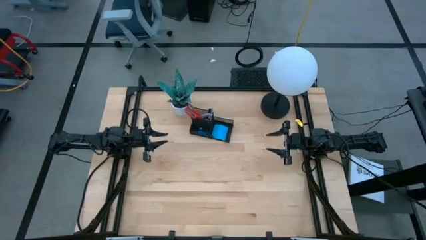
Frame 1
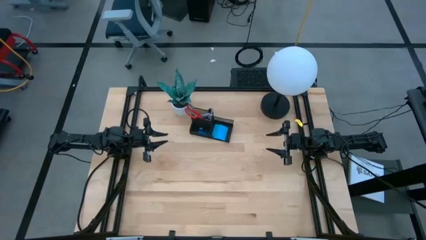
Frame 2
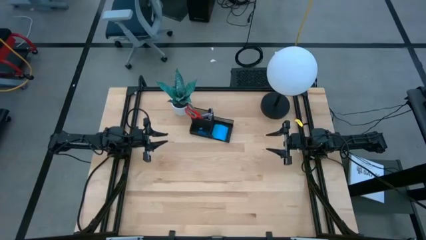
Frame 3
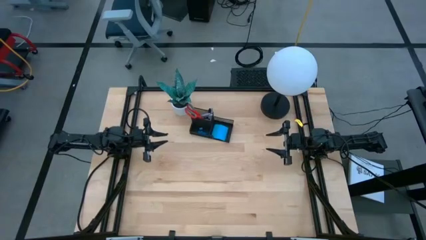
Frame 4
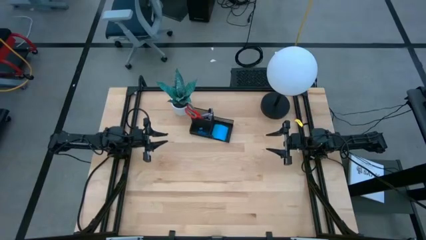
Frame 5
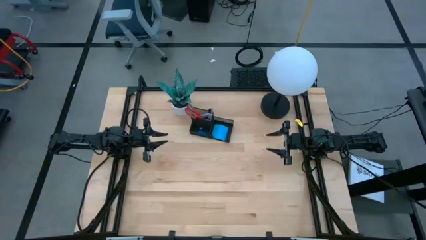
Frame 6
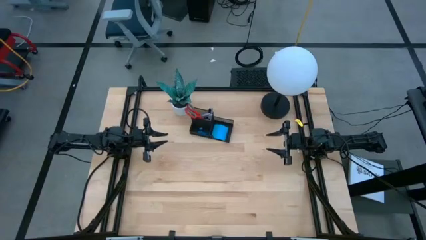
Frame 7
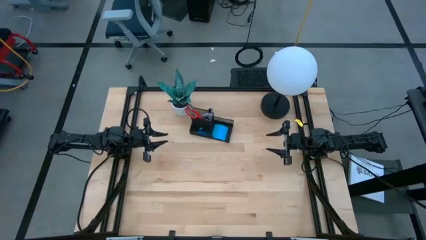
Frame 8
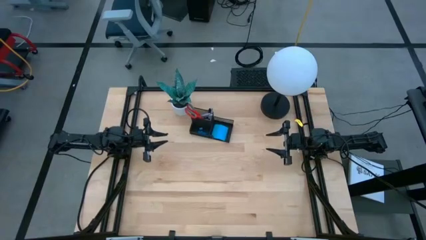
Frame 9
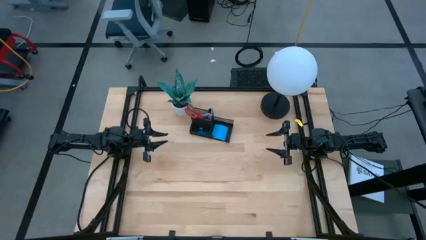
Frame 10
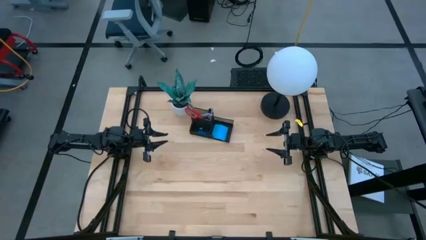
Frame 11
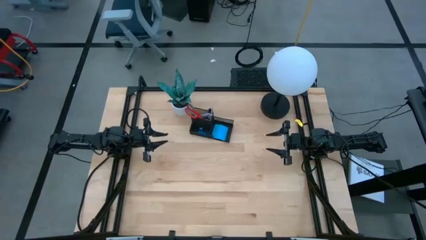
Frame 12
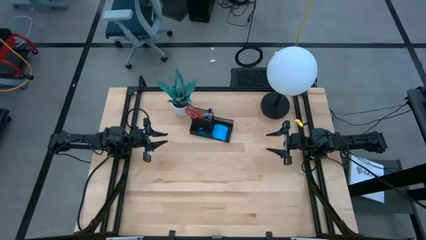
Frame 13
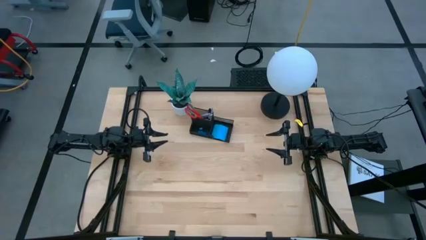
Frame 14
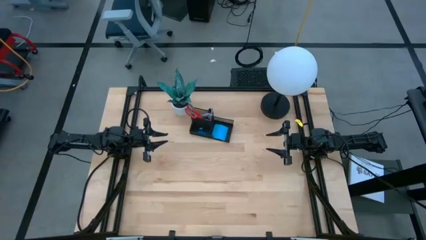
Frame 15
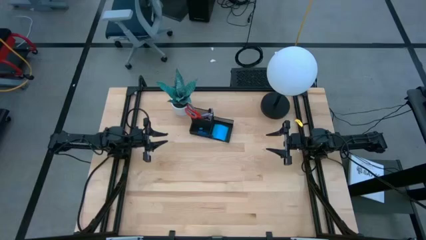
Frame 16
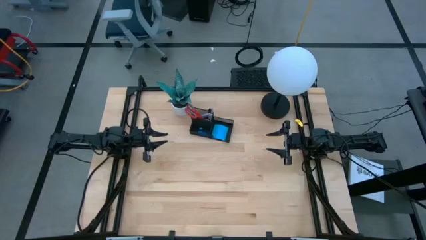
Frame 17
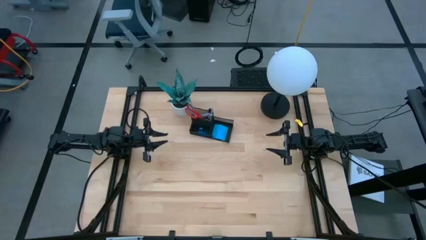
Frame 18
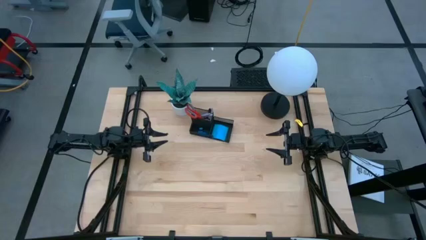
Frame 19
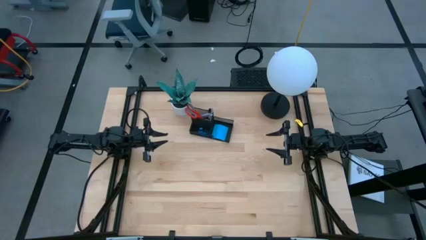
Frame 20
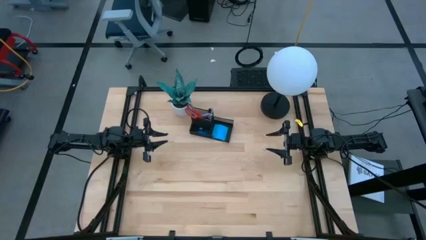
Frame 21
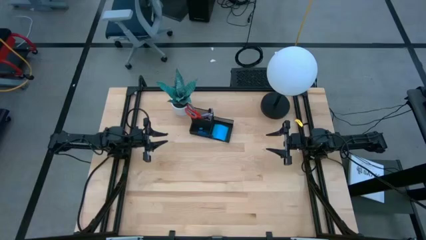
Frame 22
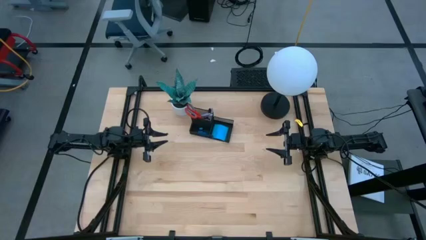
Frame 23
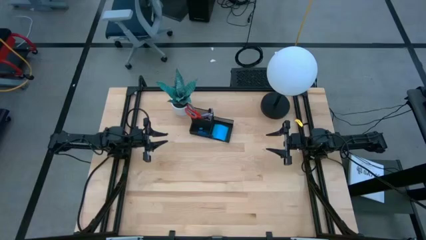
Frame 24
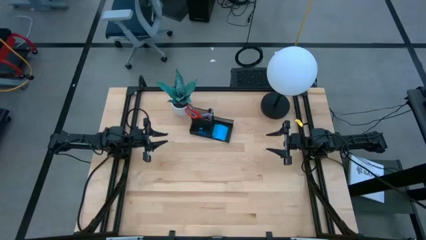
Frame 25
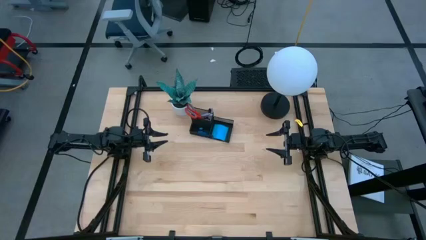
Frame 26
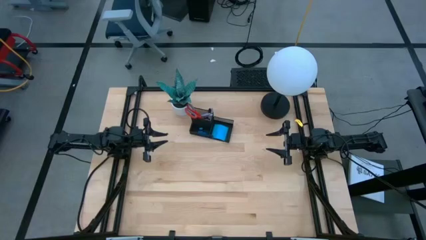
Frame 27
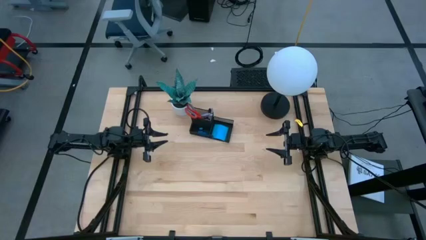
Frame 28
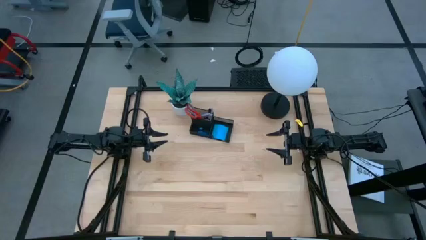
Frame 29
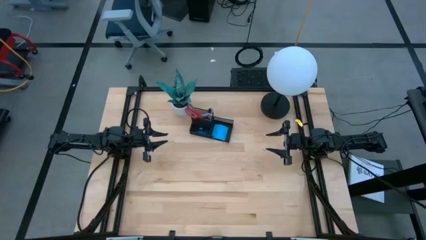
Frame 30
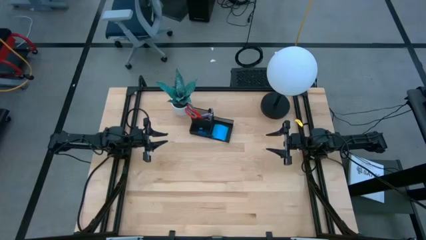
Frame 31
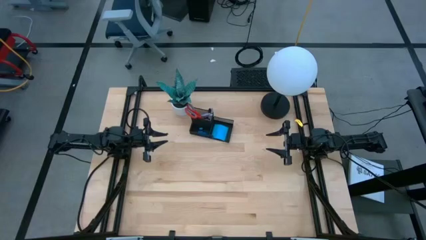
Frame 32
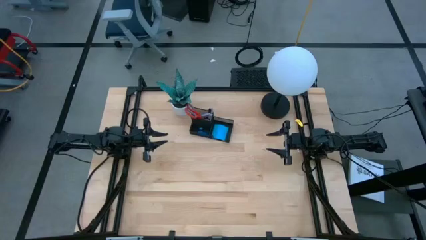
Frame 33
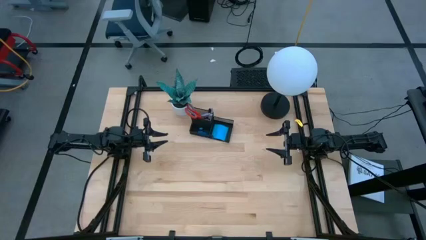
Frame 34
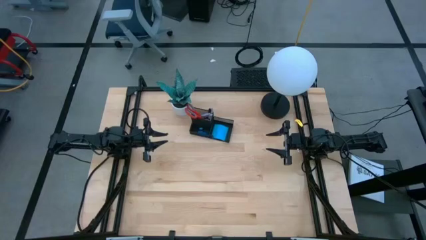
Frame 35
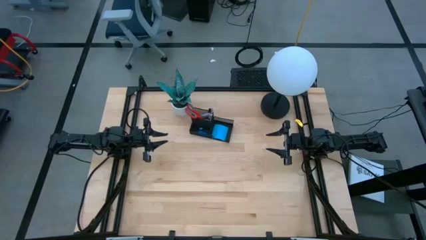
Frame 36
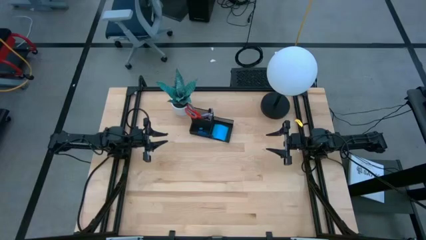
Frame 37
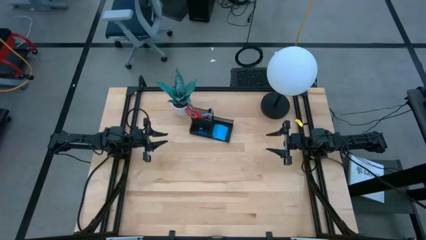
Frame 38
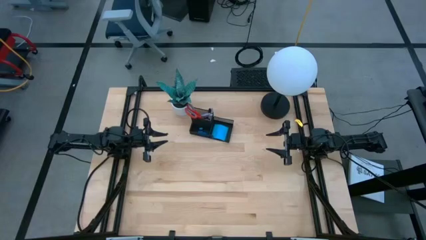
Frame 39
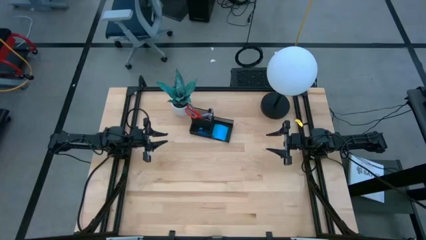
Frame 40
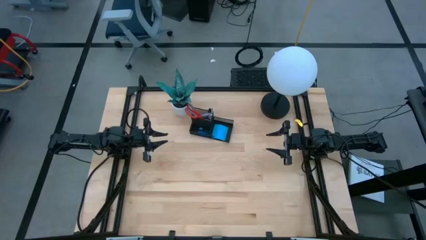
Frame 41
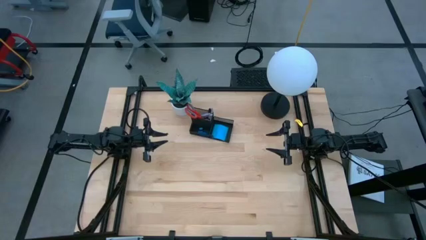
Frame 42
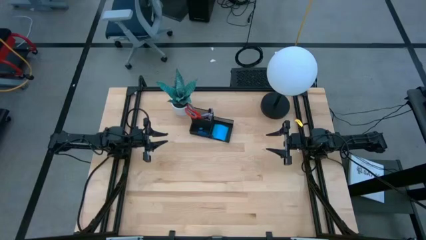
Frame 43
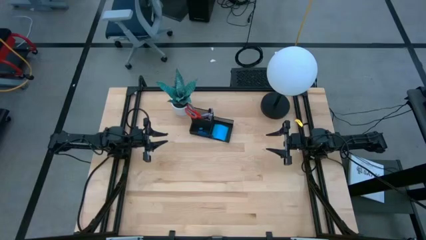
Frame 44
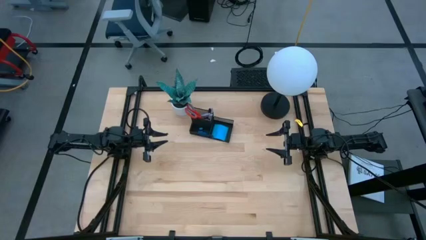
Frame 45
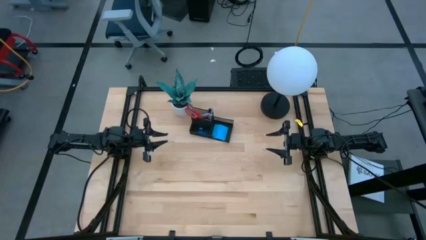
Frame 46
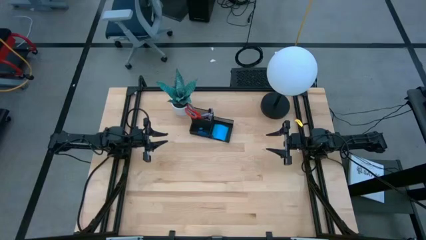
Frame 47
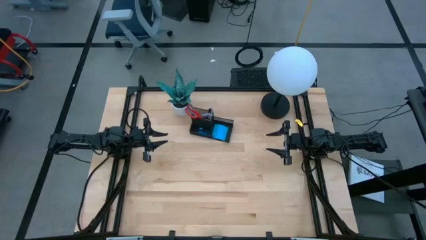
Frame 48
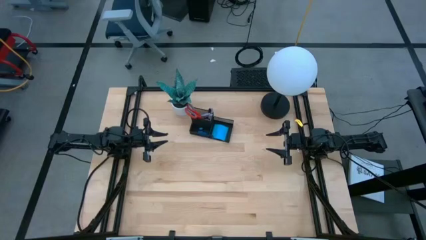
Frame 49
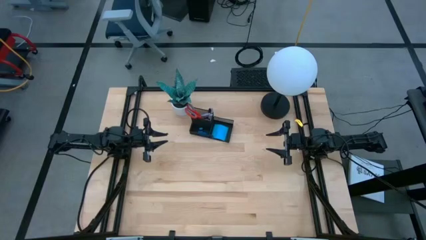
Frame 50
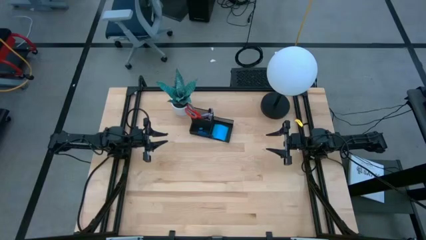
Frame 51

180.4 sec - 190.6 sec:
Task: Pick and place office supplies into organizer
Return to Home Position

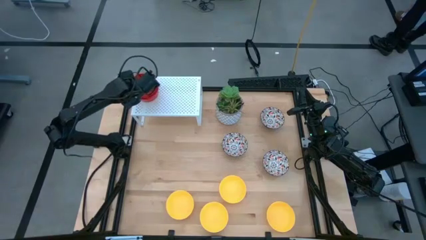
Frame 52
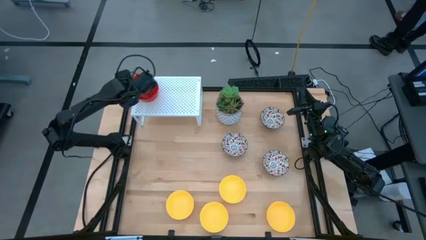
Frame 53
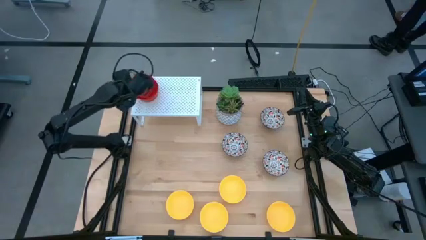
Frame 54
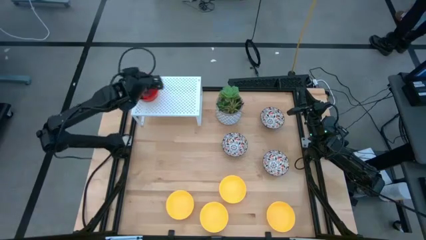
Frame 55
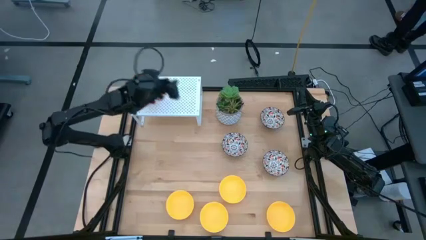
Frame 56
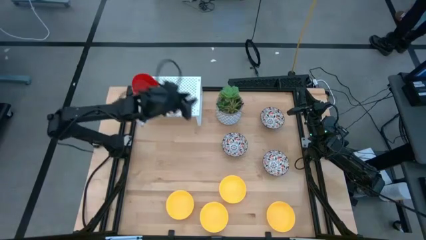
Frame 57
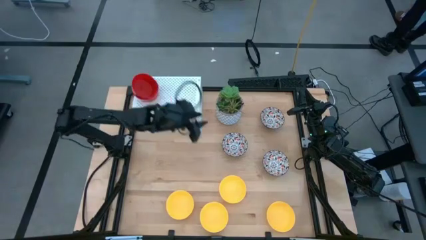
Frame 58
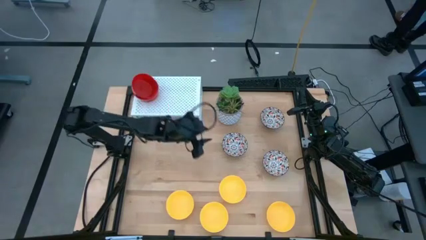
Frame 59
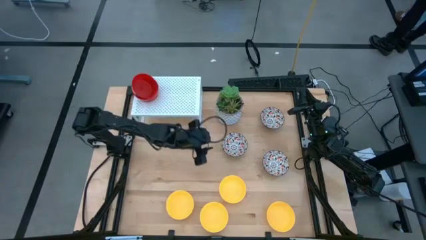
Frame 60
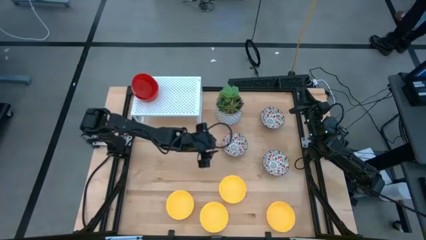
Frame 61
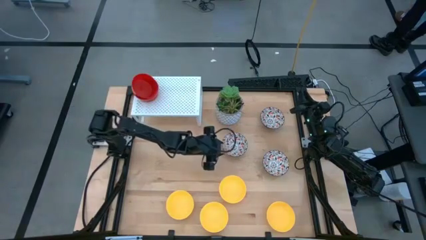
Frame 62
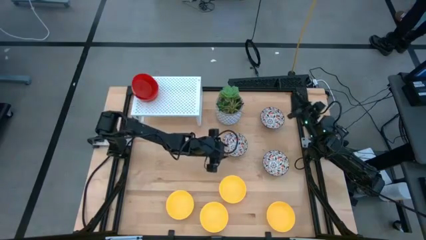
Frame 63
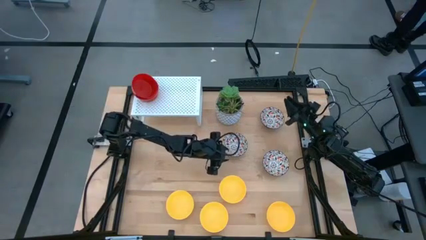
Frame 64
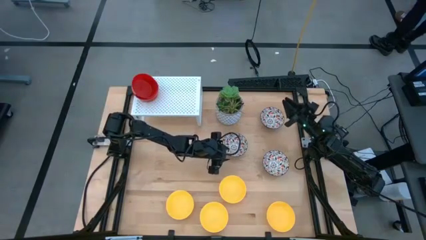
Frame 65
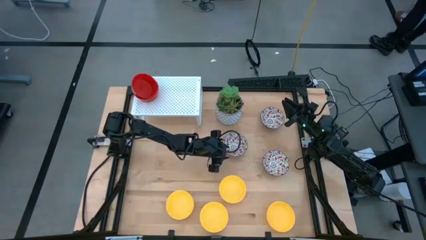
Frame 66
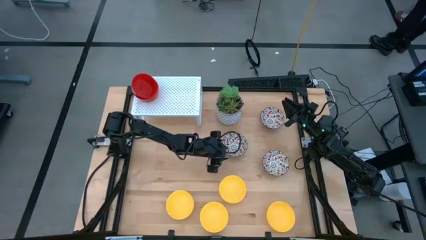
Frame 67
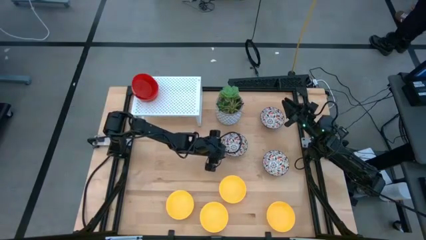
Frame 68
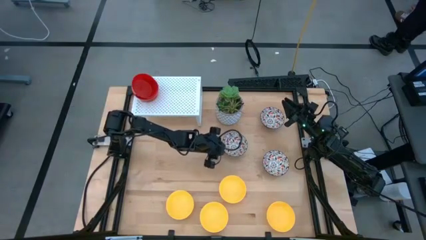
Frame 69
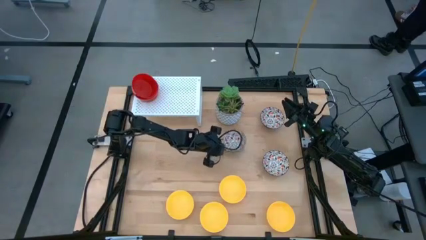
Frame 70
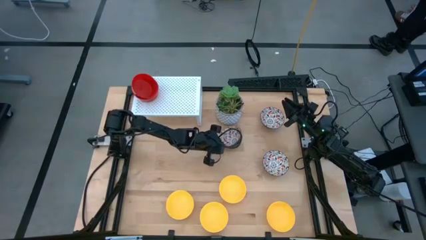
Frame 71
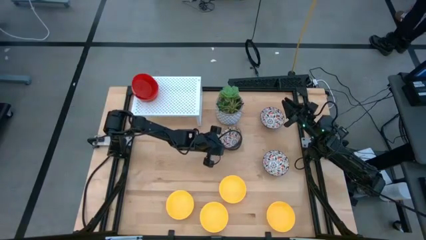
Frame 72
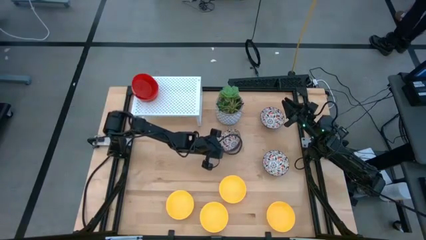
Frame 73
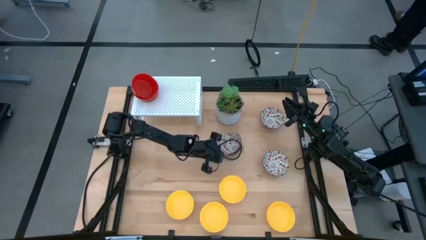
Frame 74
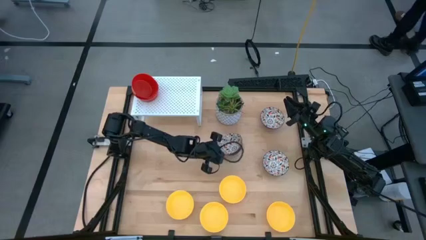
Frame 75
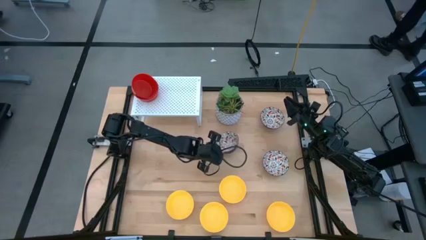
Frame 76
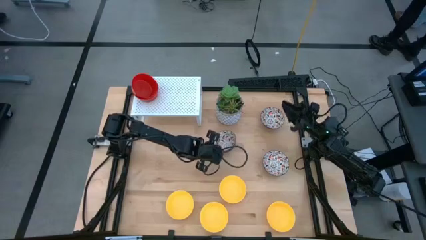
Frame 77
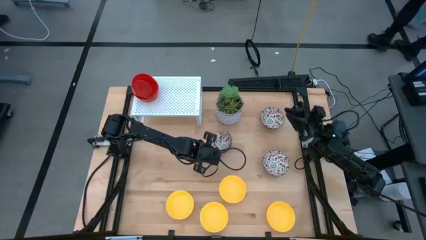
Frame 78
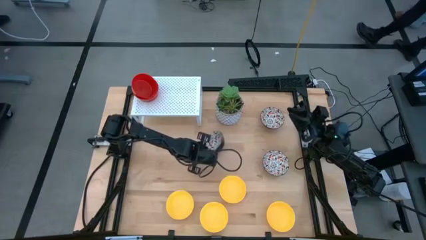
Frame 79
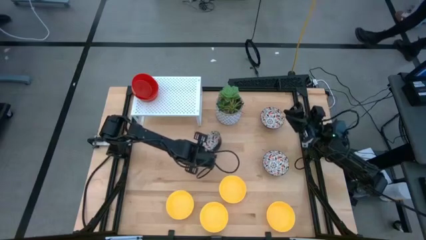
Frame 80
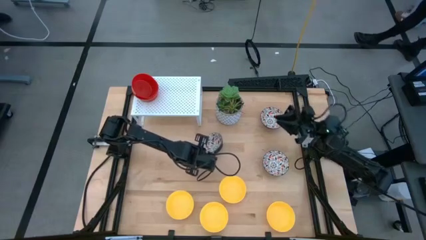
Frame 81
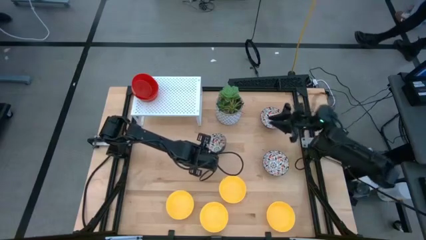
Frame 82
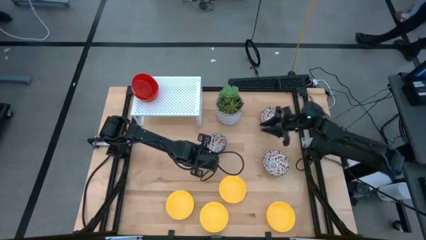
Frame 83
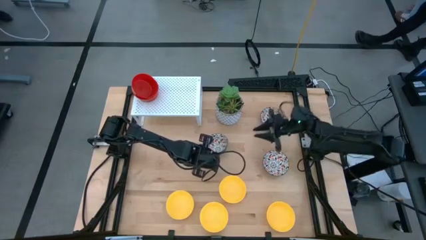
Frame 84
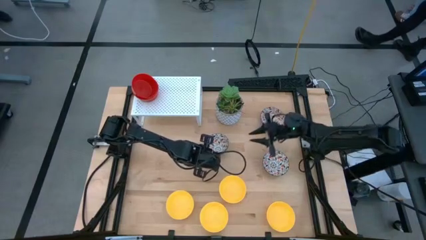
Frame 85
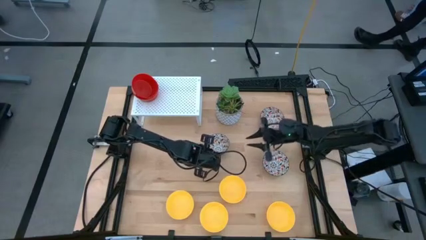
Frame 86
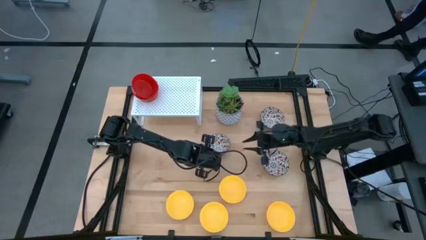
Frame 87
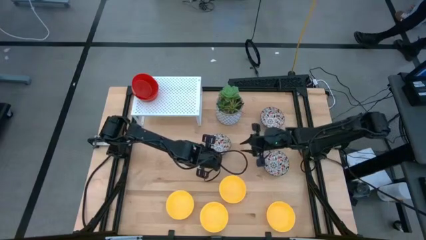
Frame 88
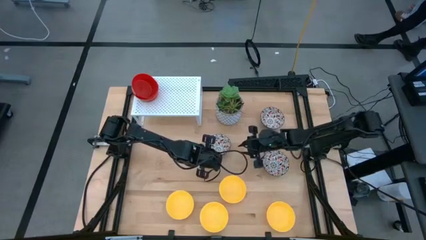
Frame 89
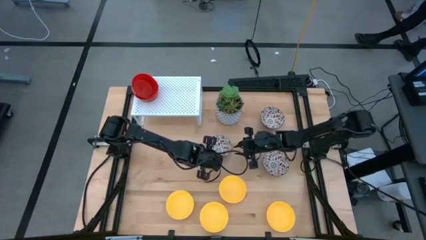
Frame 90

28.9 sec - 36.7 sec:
Task: Pick & Place Mini bowls
Put the white patterned bowl on the shelf
